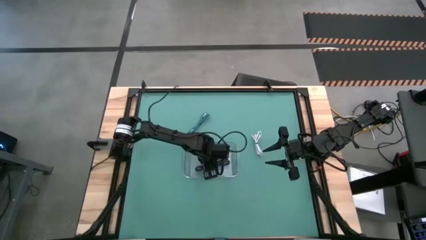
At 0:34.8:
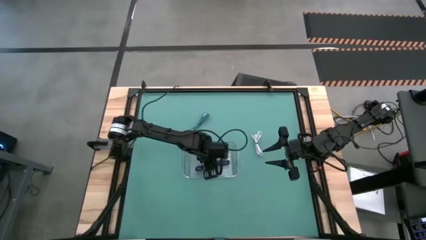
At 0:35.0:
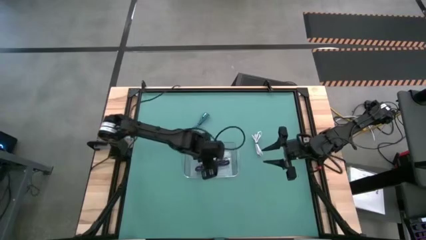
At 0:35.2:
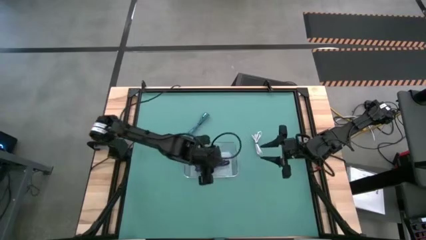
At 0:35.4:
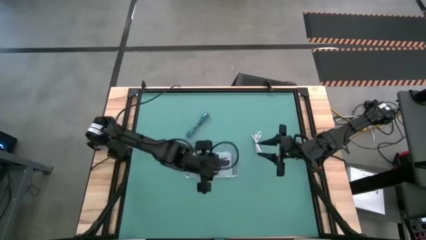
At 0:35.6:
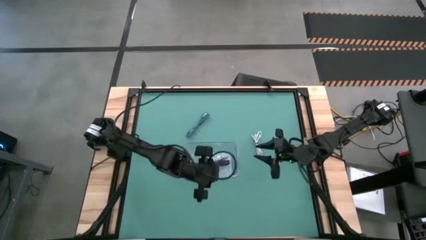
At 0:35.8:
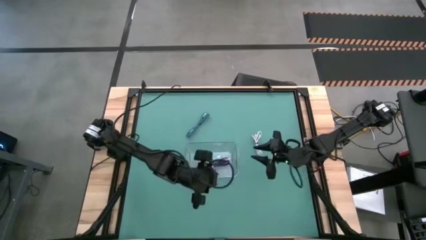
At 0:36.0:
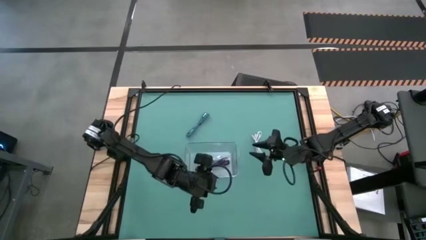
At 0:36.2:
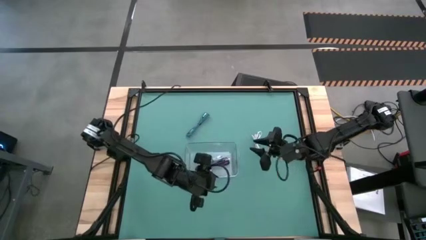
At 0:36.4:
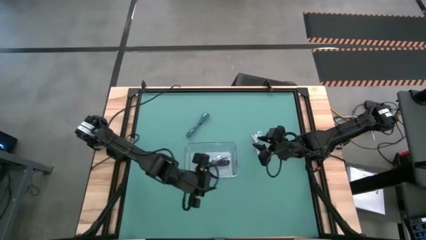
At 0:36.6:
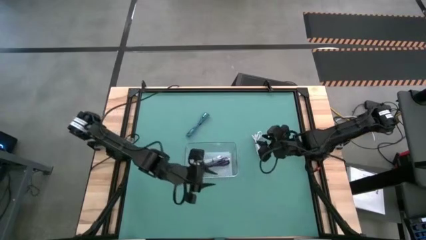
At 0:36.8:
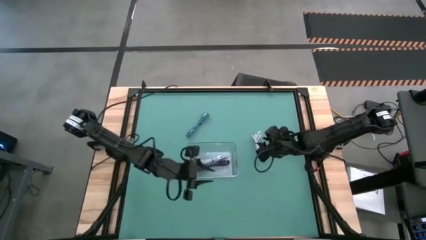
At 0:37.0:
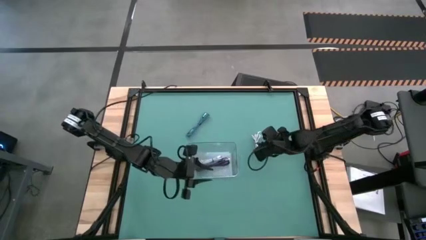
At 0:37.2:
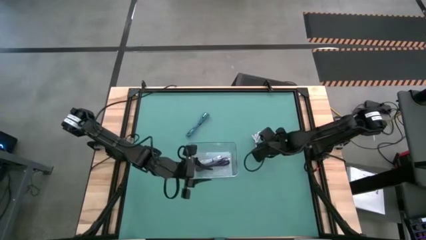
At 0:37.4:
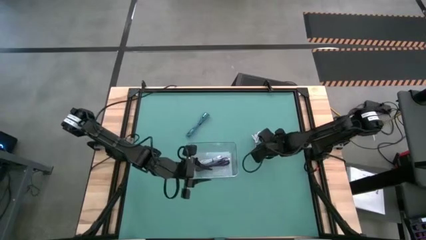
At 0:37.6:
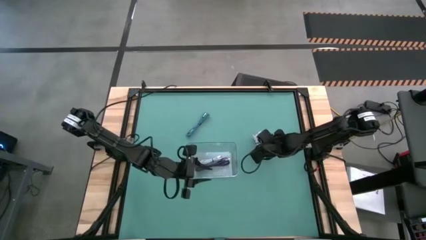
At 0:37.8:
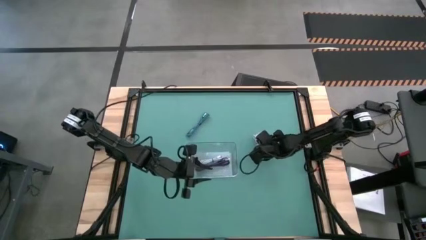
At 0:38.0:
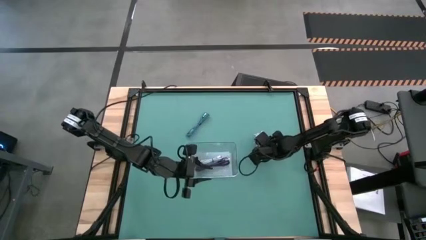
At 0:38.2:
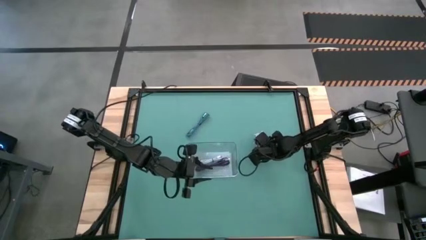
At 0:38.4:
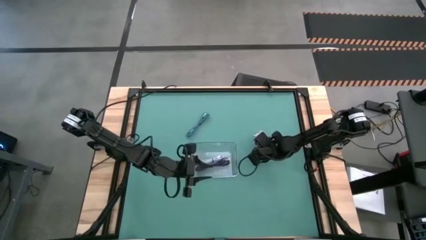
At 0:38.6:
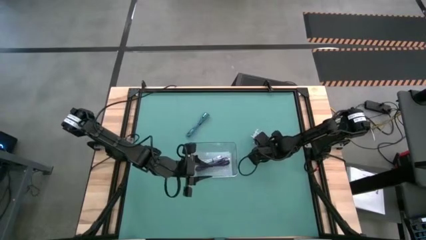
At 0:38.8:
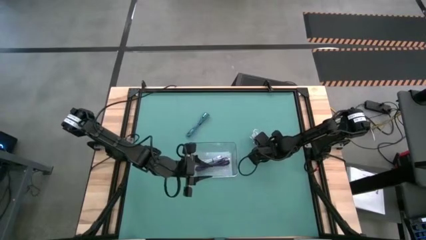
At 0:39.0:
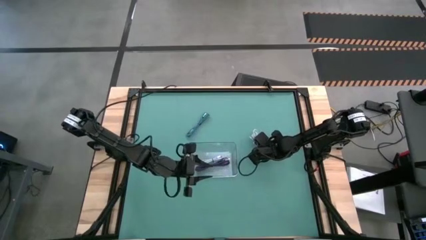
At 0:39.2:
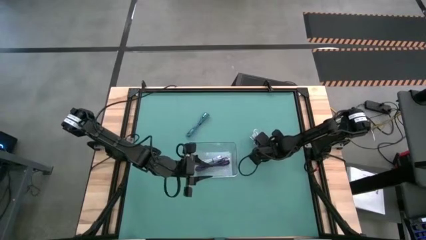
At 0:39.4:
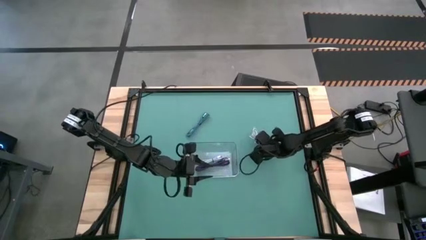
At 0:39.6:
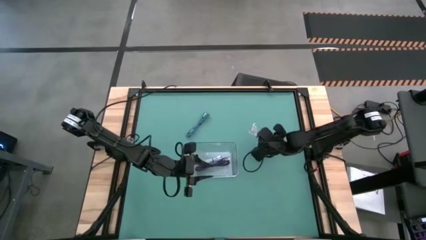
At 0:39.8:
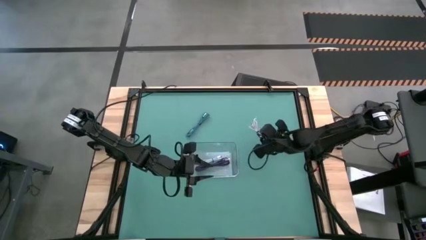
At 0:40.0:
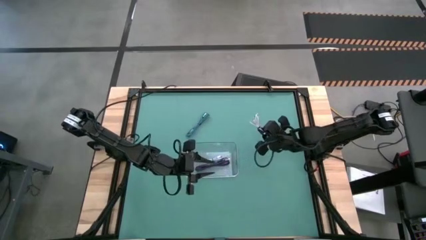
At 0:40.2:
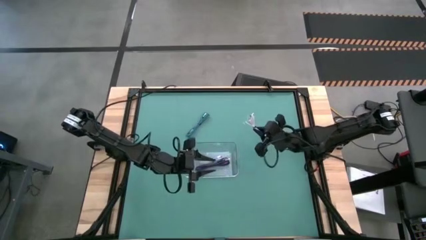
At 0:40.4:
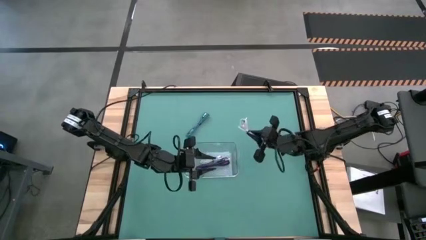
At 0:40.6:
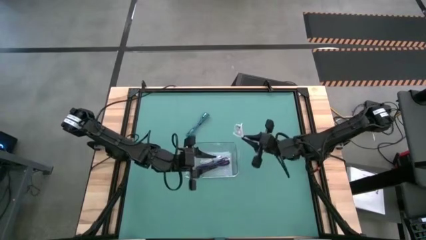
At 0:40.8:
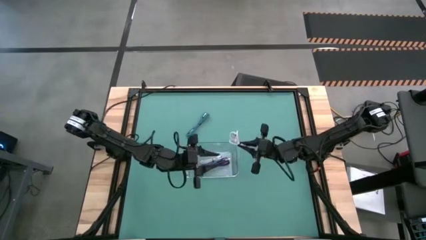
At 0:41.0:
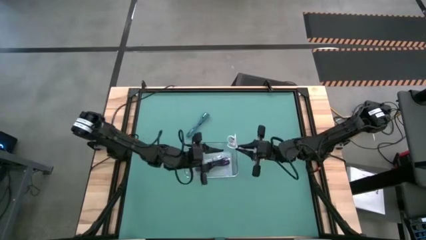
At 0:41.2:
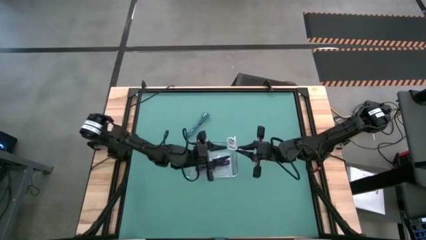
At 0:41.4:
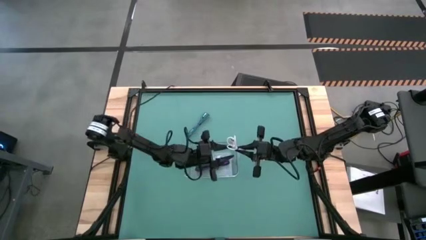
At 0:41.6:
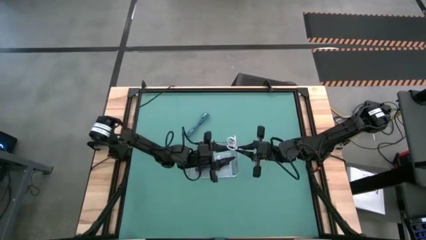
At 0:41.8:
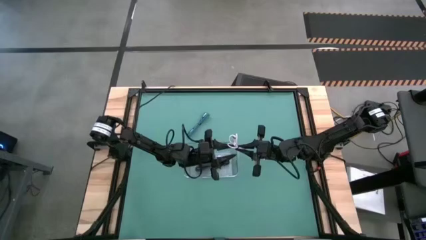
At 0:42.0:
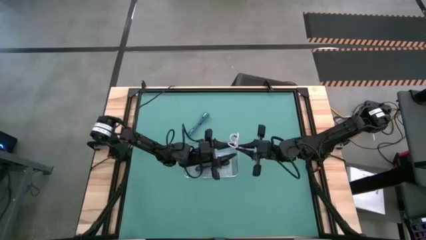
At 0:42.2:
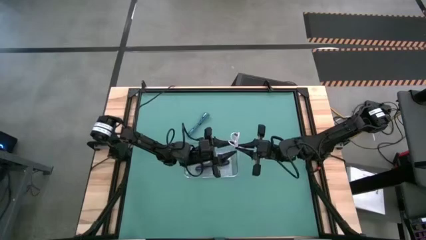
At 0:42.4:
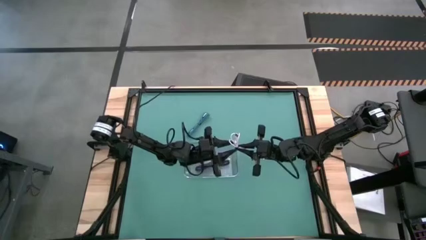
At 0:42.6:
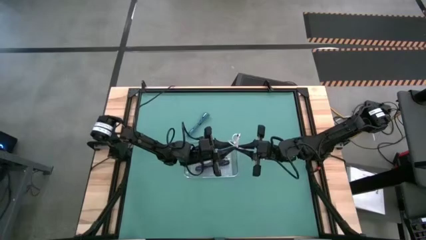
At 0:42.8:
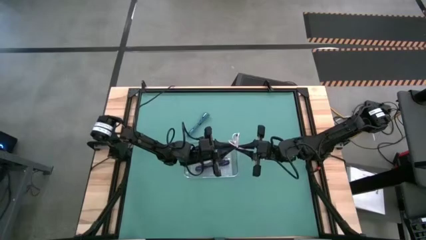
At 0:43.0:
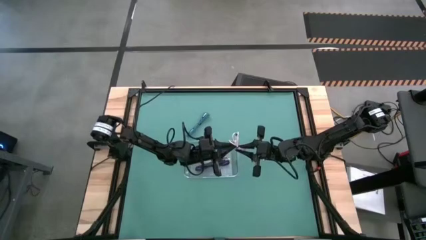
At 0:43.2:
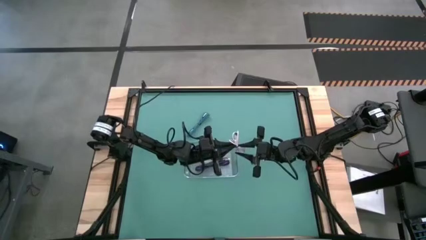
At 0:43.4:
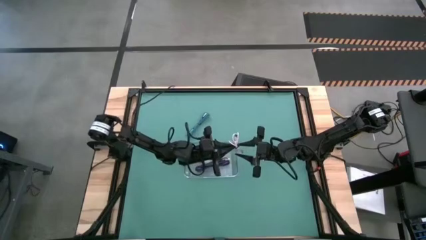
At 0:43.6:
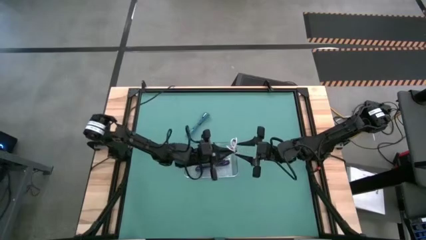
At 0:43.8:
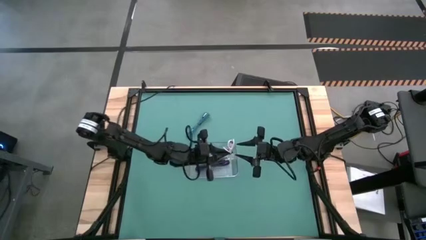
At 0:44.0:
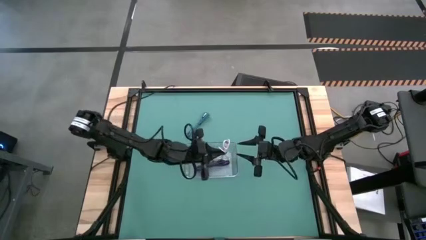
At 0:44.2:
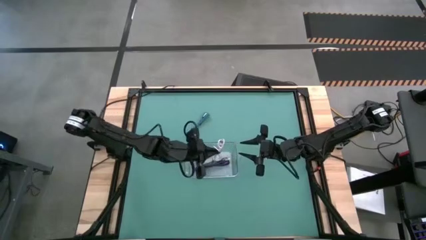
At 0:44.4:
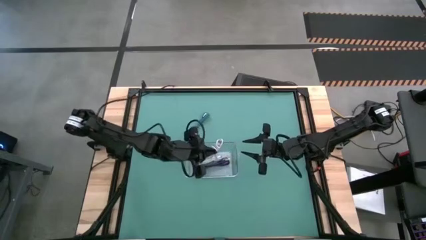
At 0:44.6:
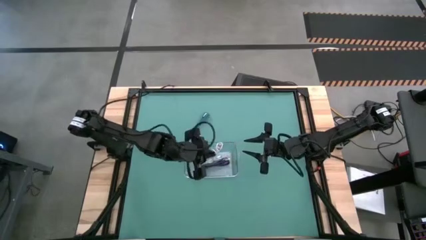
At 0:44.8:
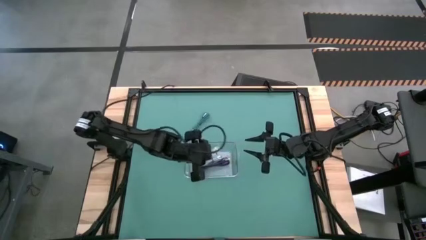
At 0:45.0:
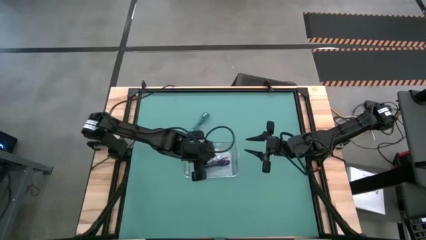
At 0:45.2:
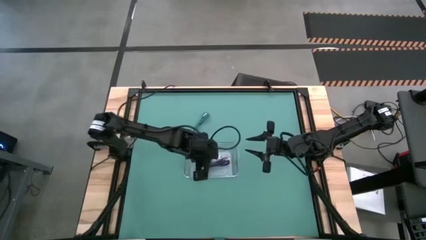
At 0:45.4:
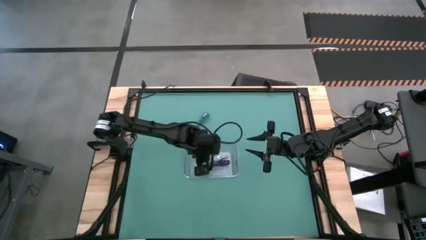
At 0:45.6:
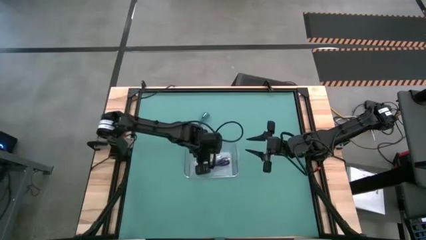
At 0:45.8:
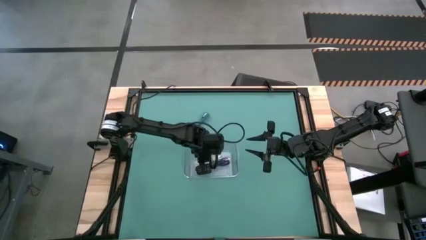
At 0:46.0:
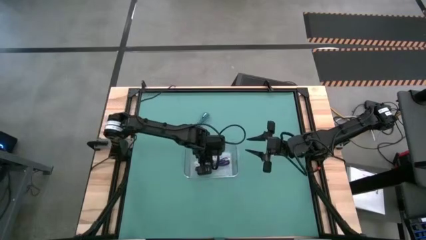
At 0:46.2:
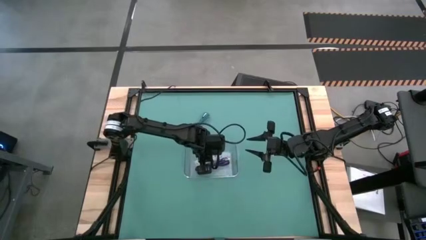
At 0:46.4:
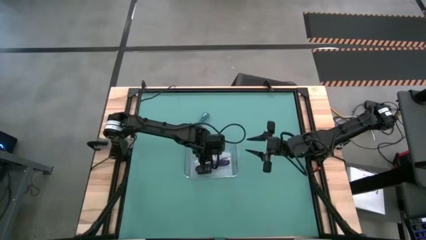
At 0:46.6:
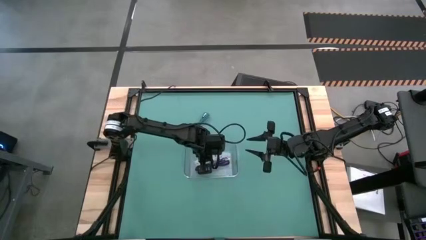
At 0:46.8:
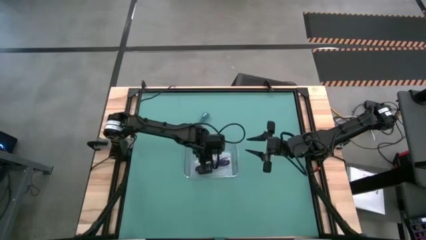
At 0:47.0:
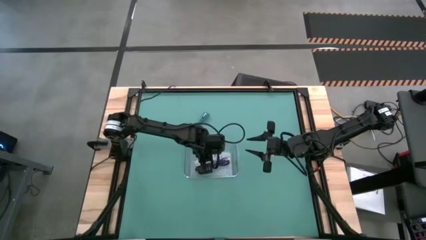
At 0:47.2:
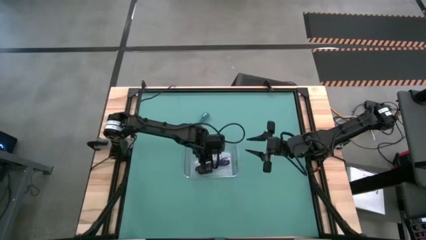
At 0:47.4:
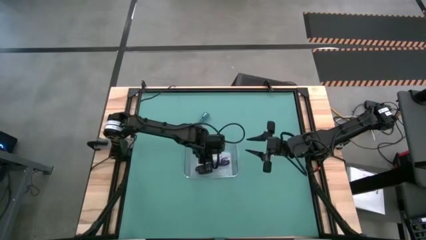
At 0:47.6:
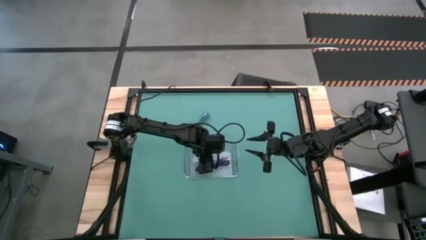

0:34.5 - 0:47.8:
Task: Pick and place USB-C Cables
Put the white charger cable into the transparent bin
